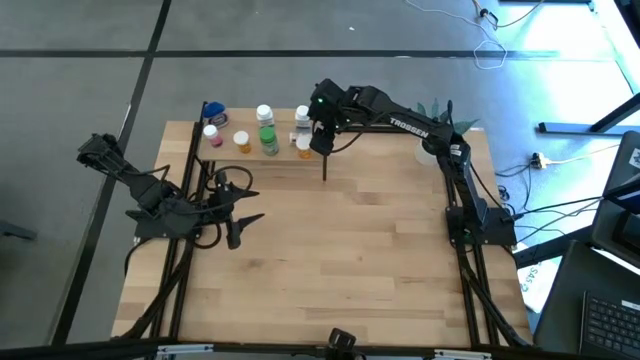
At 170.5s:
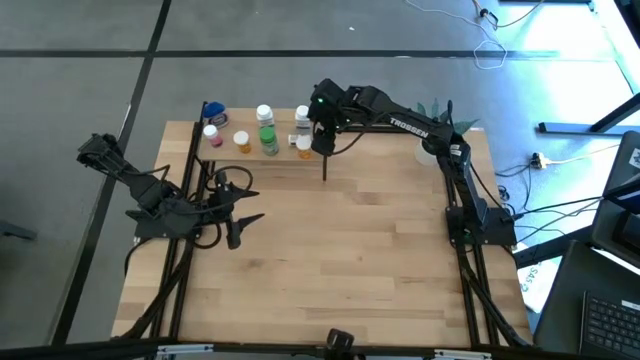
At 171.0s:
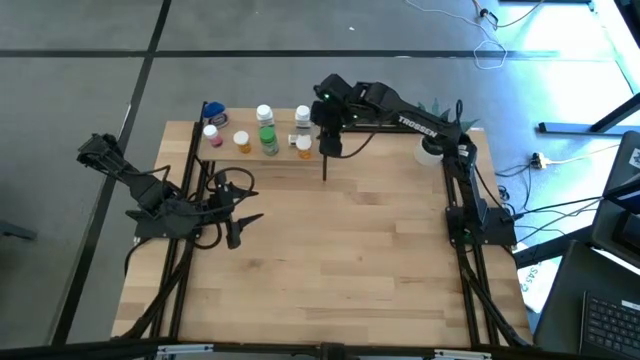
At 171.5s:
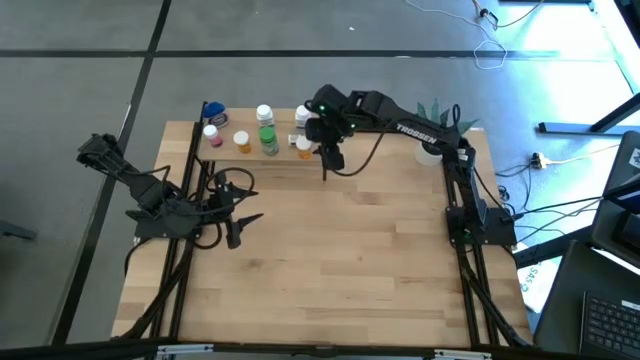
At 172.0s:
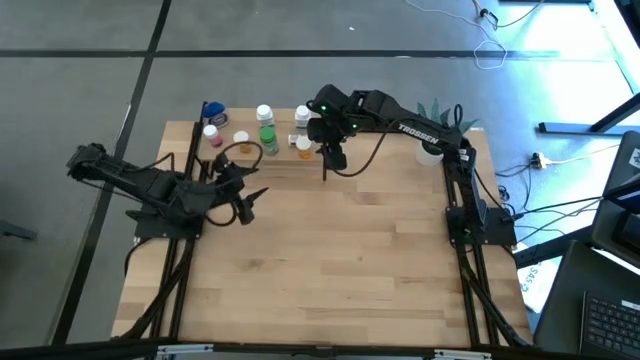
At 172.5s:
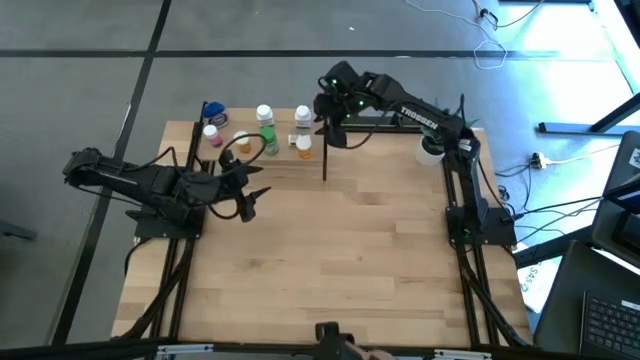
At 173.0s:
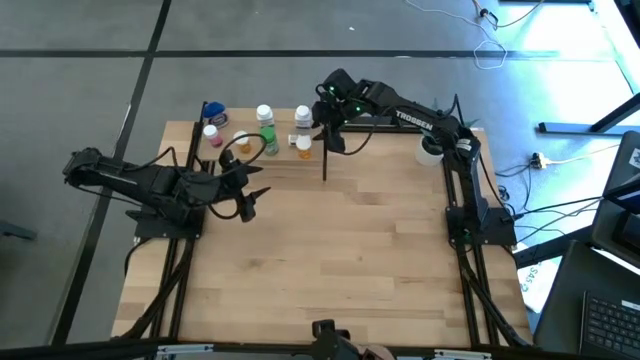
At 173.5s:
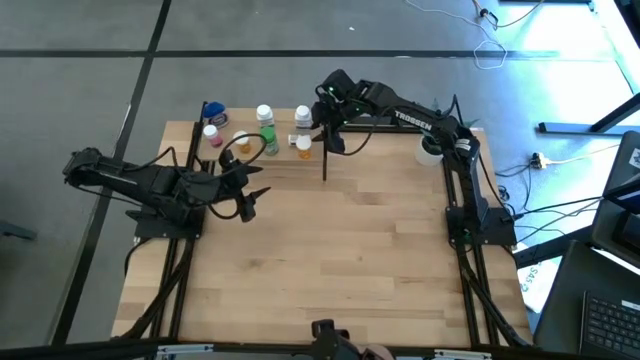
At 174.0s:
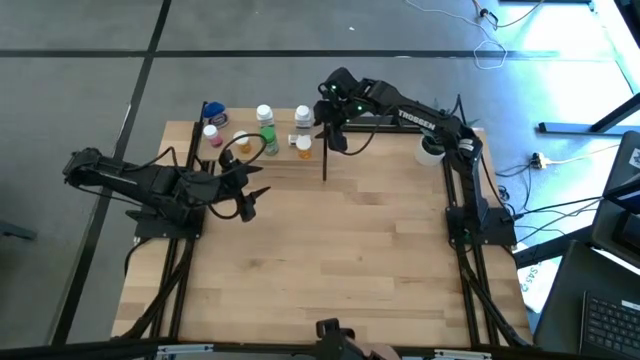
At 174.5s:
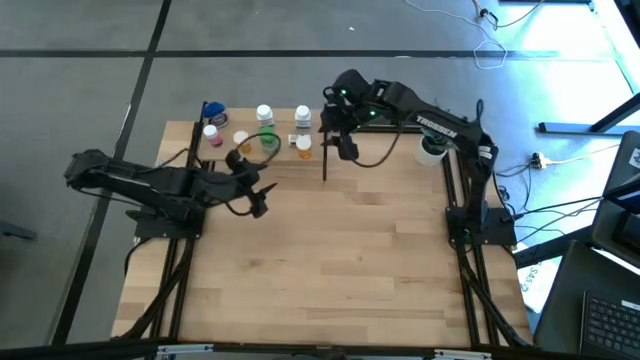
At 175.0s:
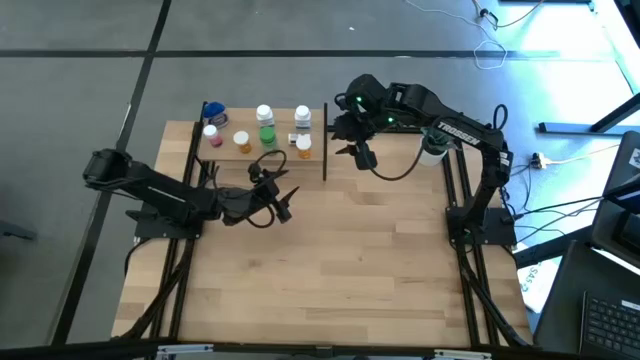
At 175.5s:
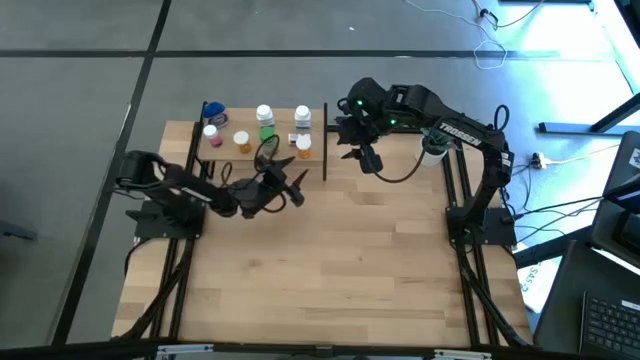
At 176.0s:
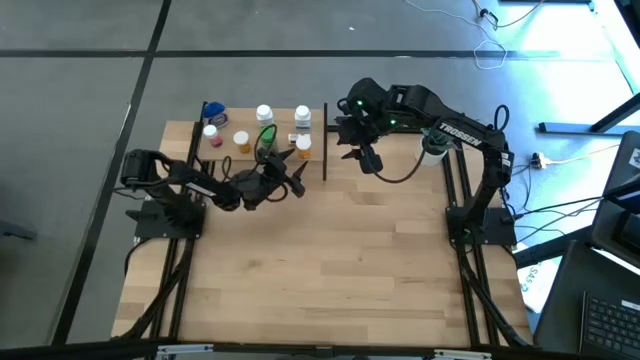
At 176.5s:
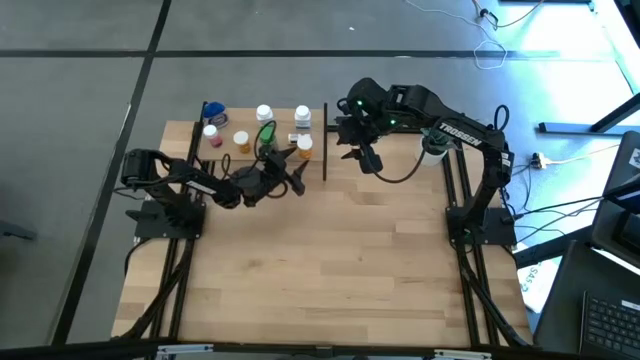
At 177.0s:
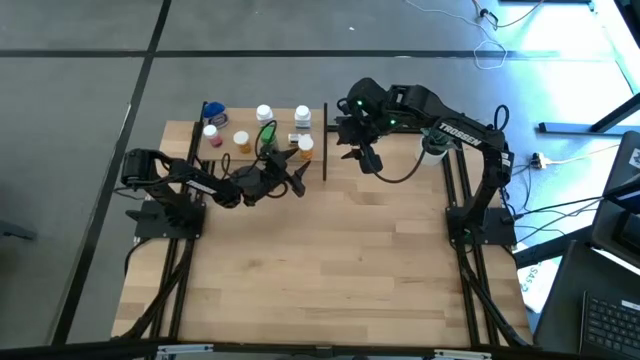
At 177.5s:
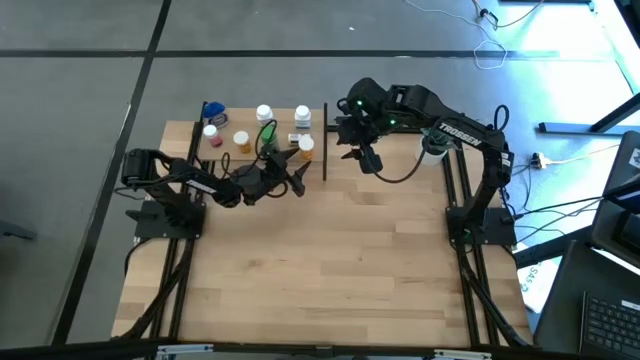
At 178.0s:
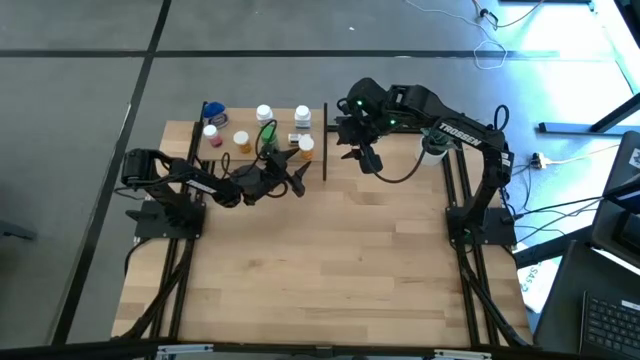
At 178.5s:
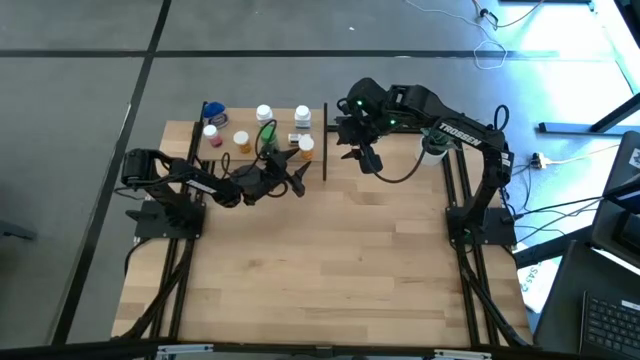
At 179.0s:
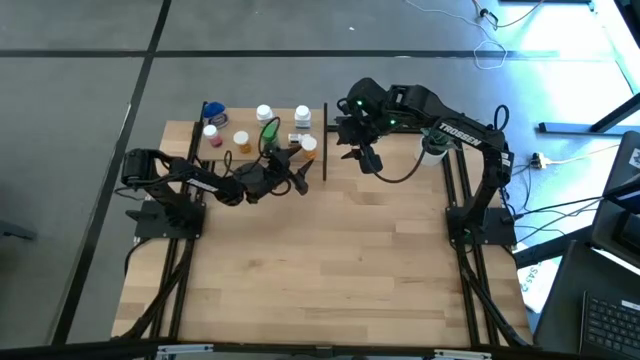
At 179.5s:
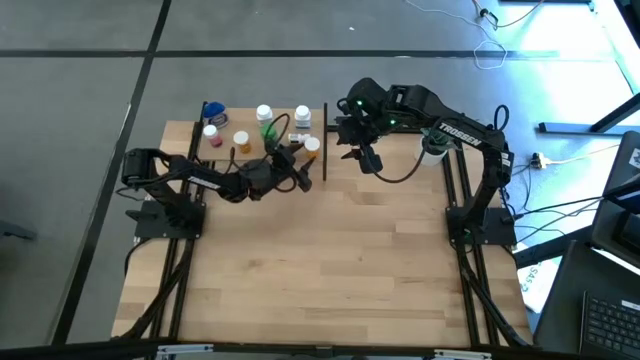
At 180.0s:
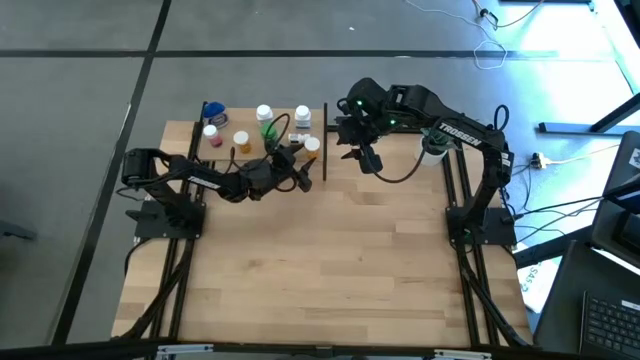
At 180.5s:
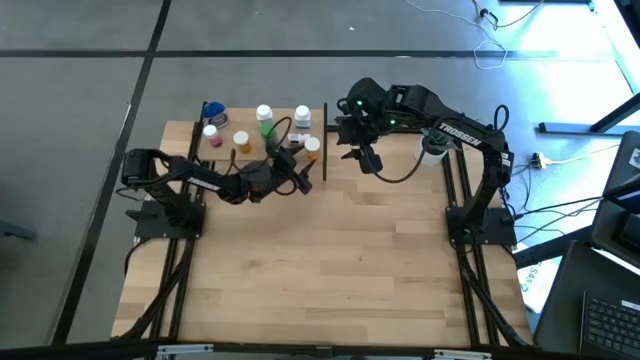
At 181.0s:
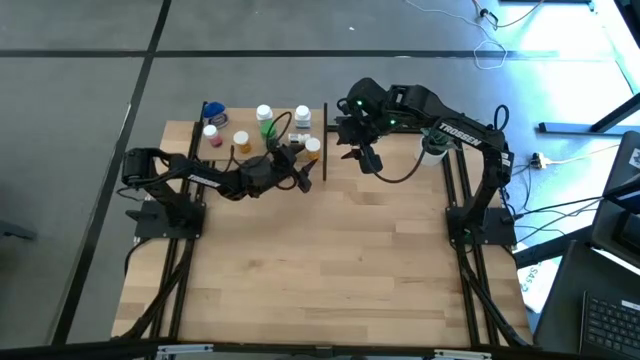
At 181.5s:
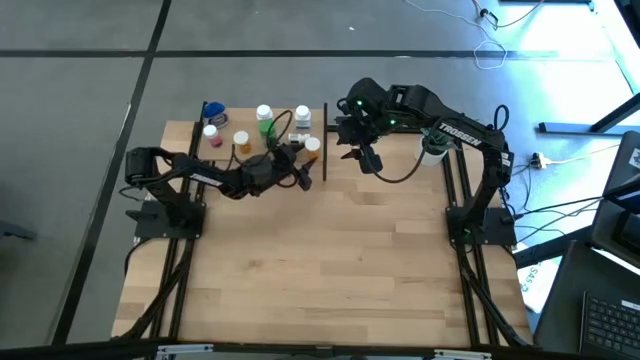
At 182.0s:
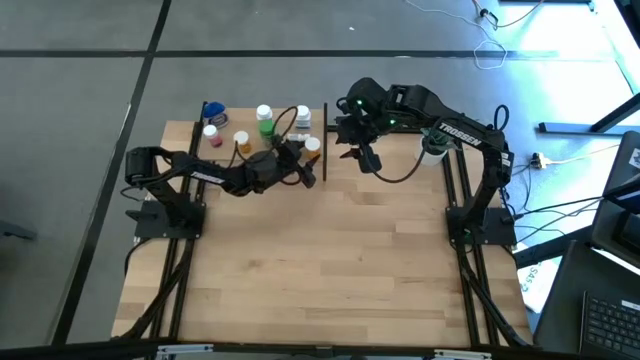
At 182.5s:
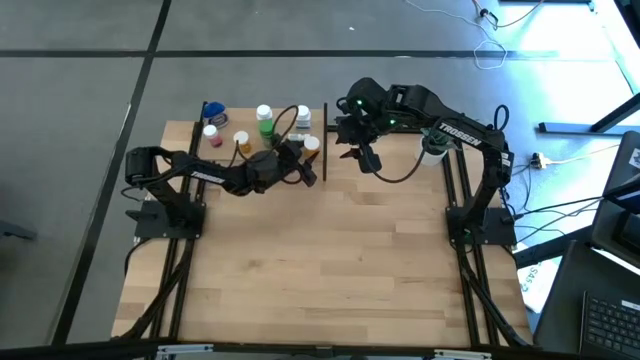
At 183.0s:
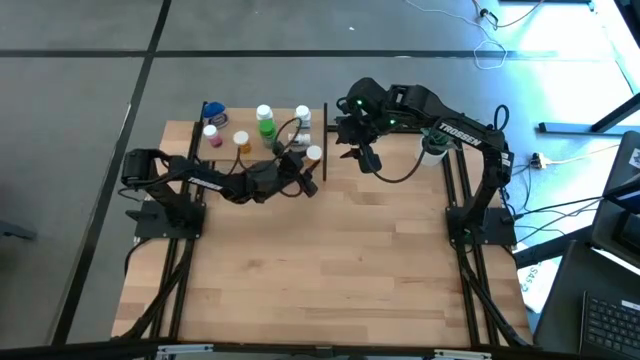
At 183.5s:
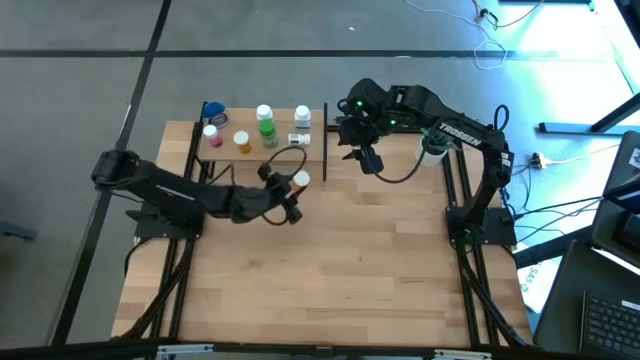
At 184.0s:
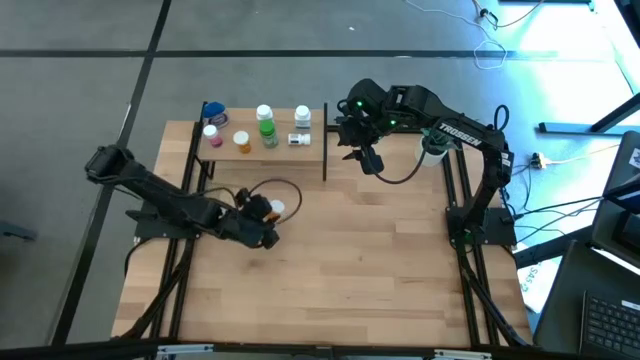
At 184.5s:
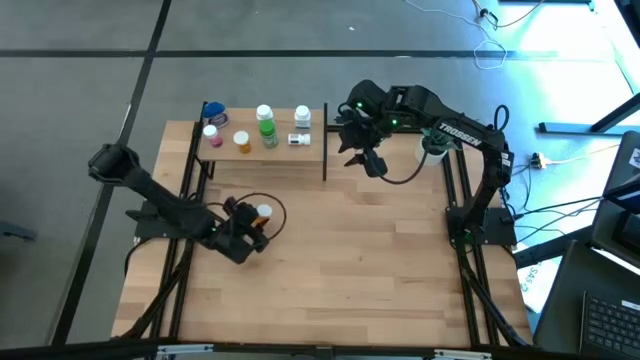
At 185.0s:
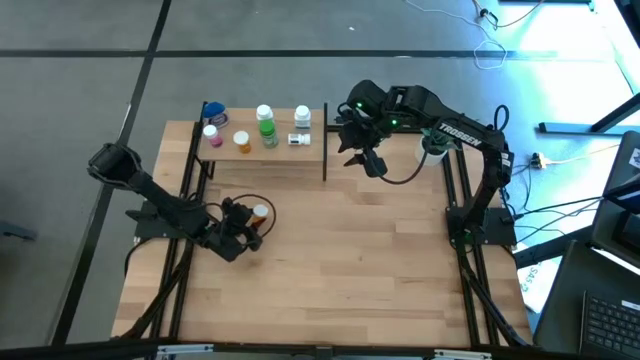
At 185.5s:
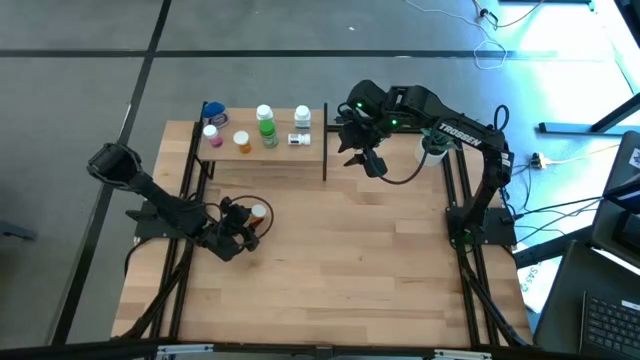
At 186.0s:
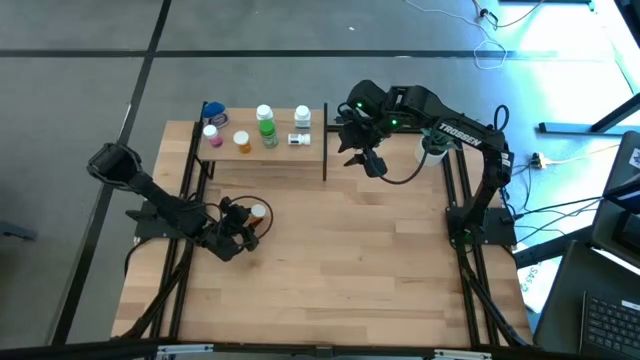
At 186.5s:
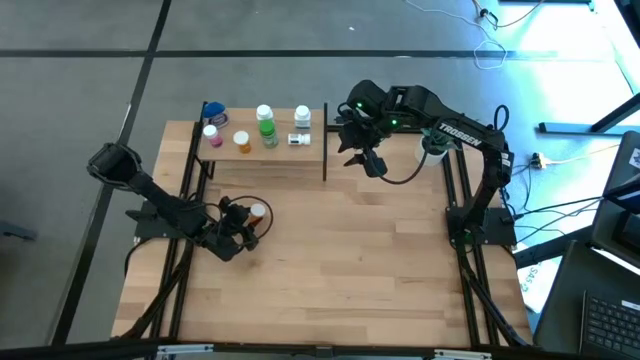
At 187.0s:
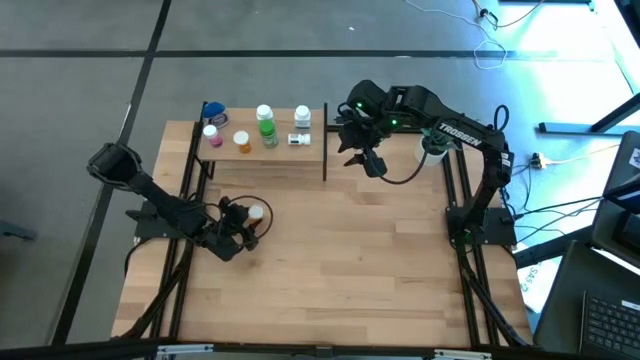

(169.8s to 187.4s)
Task: Pick and place medicine bottles onto shelf by color
Remove the orange pill bottle from the shelf

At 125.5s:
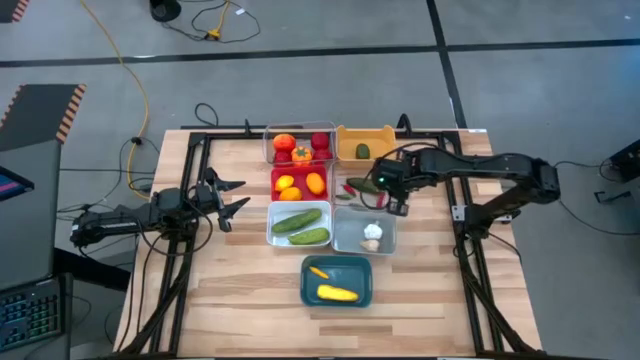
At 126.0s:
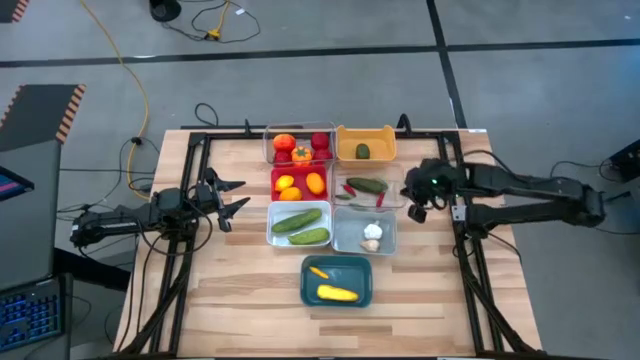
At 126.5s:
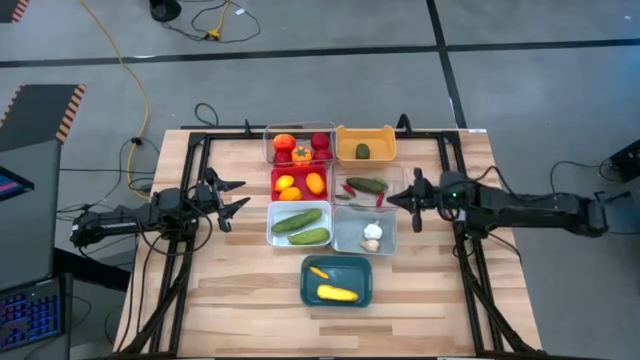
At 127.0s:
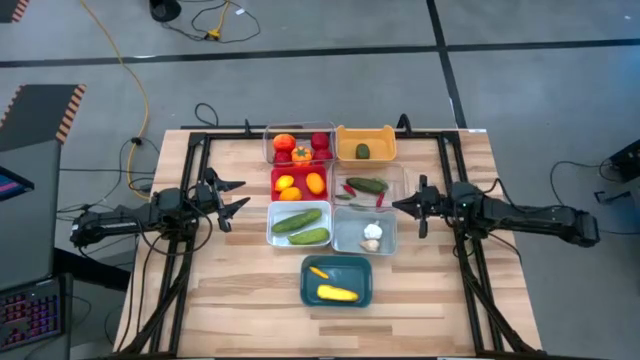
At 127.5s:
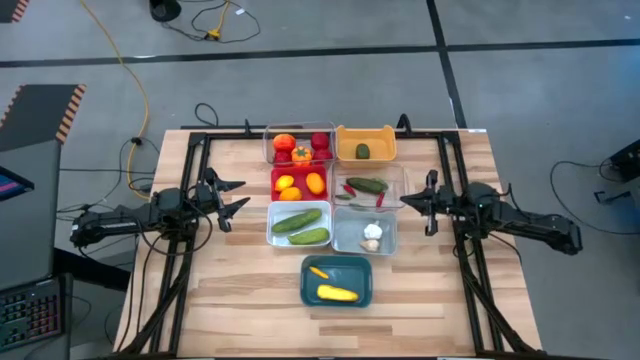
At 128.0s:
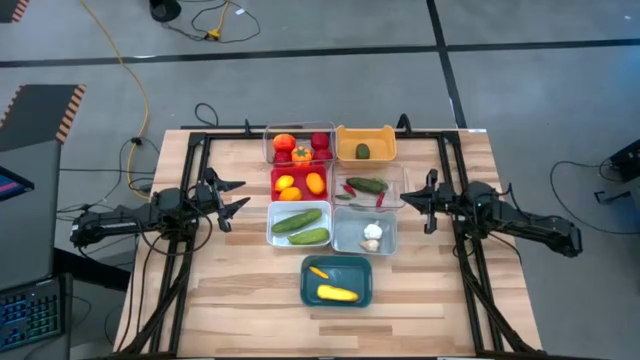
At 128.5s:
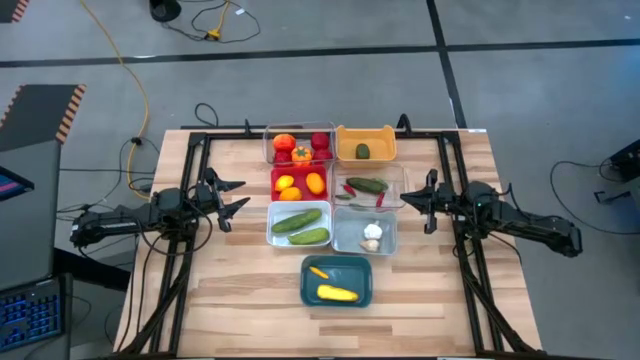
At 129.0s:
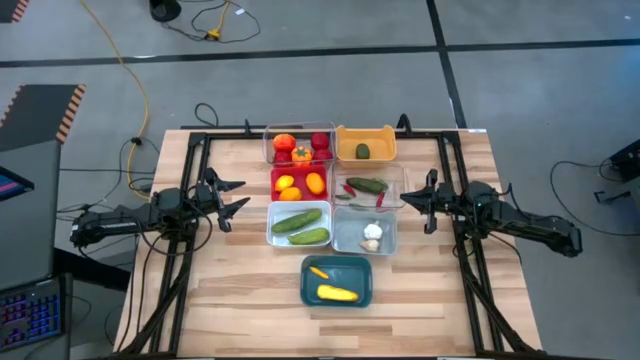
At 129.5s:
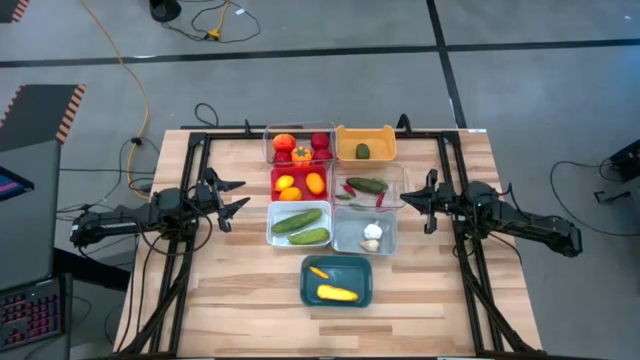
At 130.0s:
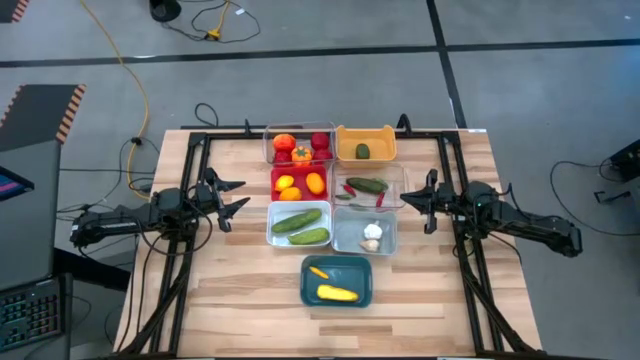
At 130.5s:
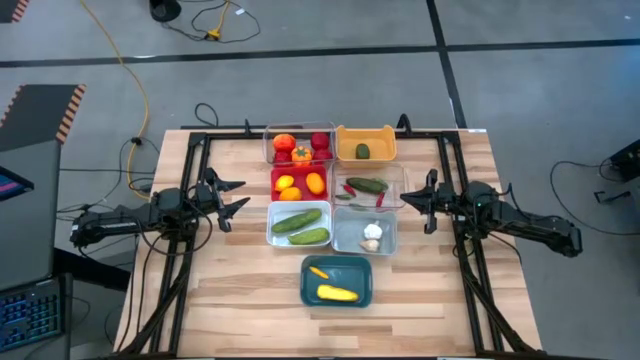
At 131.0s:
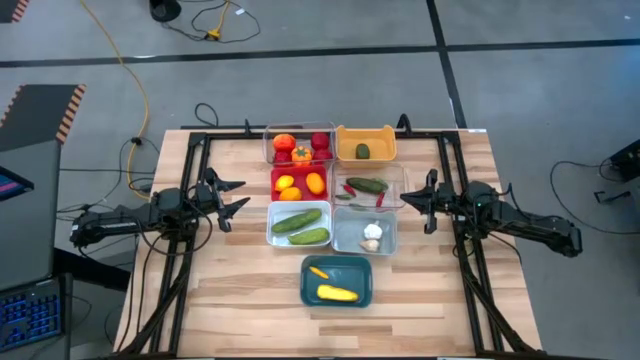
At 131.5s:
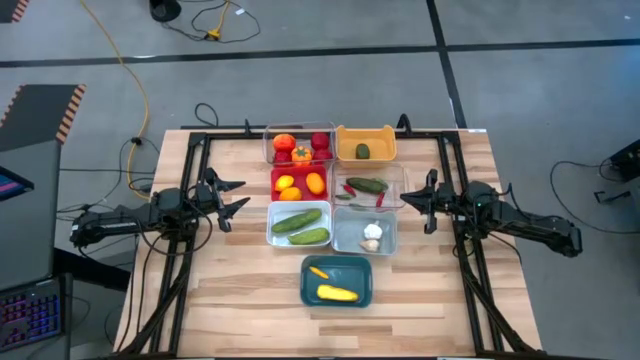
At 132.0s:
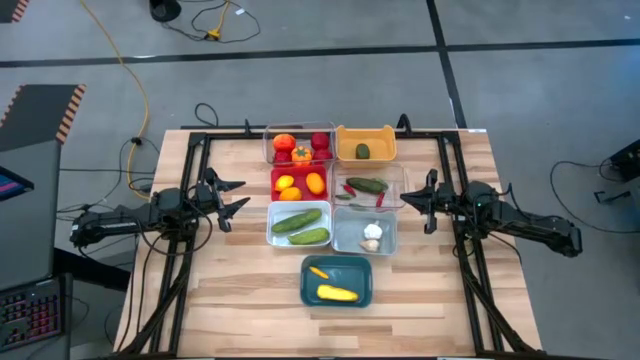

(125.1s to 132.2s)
Task: Sort produce into baskets
Return to Home Position
